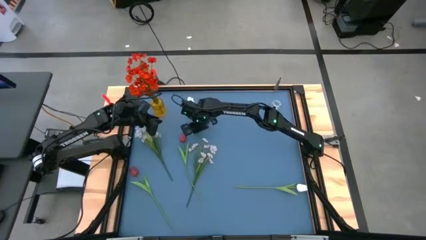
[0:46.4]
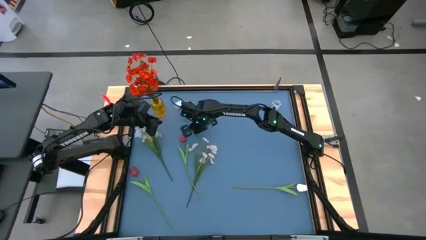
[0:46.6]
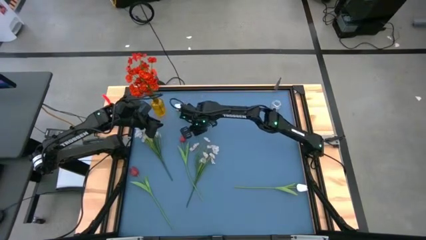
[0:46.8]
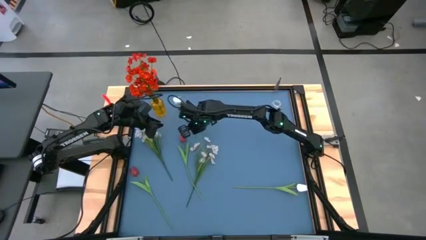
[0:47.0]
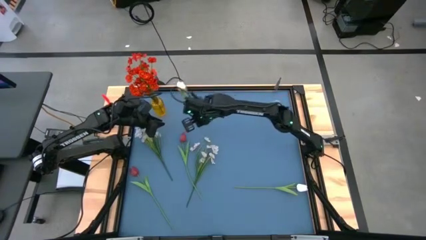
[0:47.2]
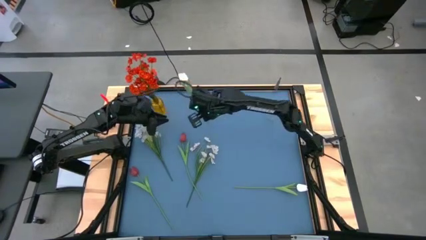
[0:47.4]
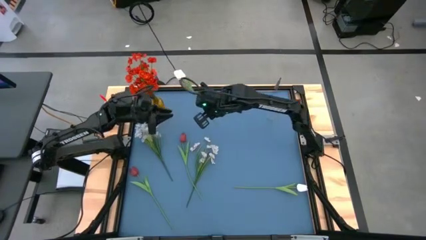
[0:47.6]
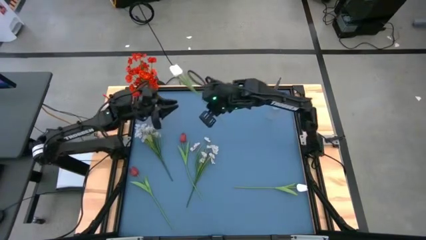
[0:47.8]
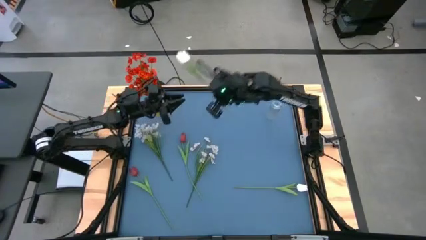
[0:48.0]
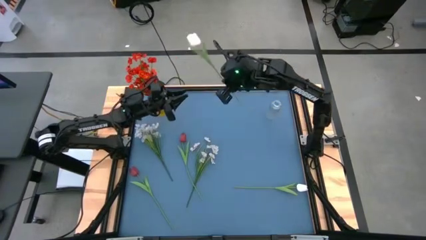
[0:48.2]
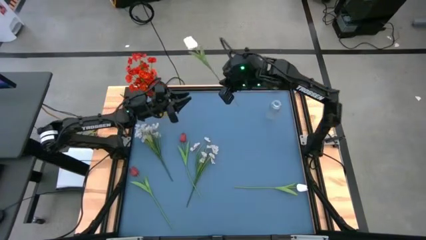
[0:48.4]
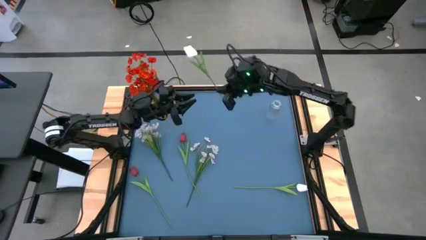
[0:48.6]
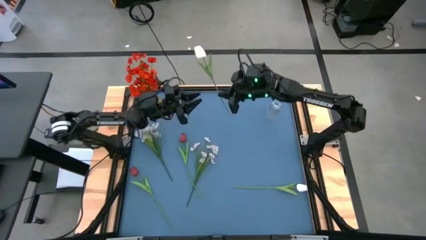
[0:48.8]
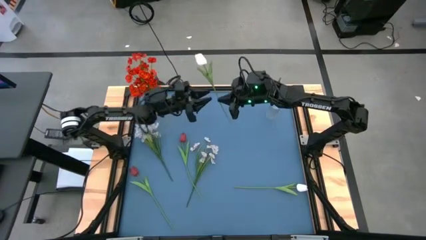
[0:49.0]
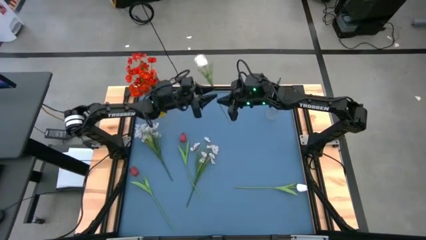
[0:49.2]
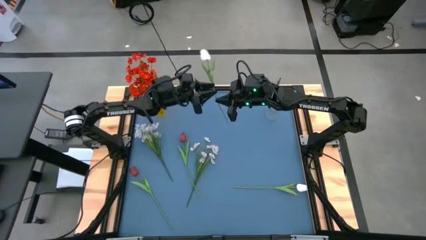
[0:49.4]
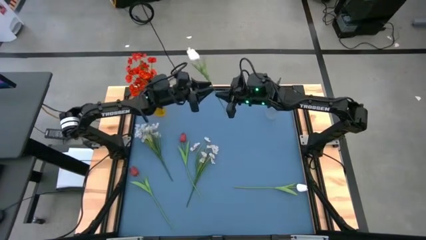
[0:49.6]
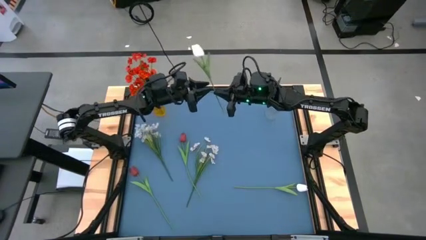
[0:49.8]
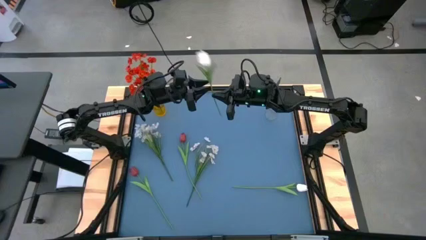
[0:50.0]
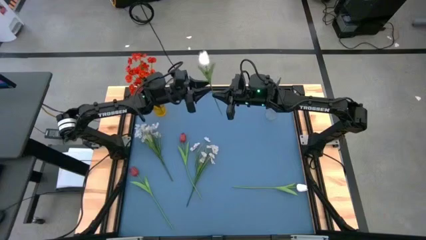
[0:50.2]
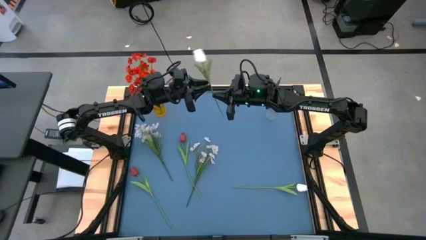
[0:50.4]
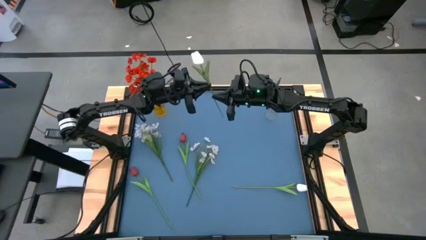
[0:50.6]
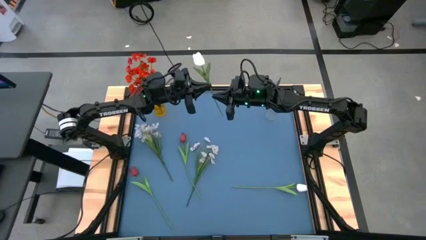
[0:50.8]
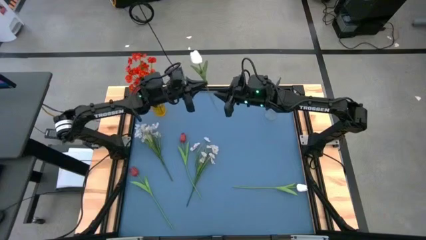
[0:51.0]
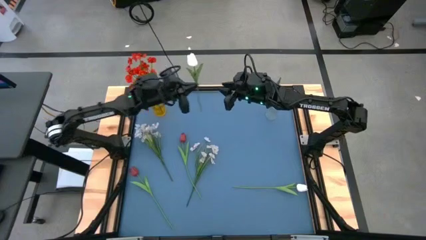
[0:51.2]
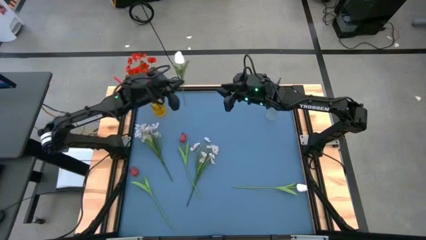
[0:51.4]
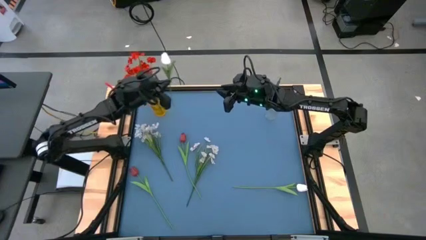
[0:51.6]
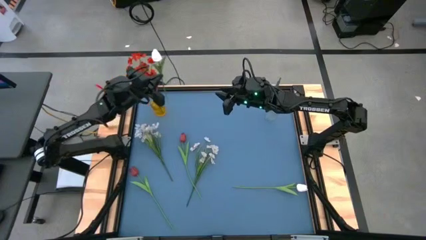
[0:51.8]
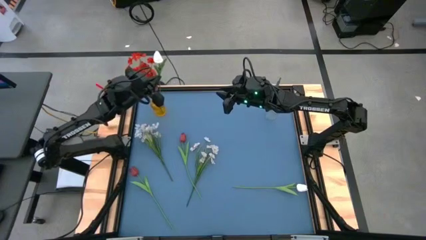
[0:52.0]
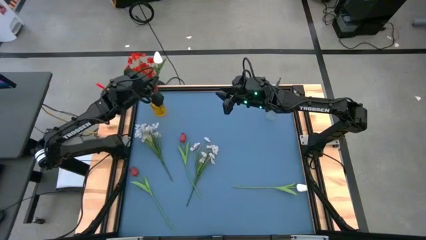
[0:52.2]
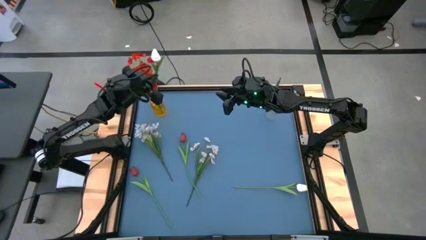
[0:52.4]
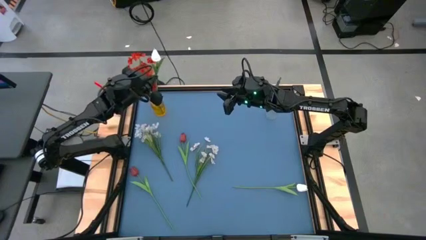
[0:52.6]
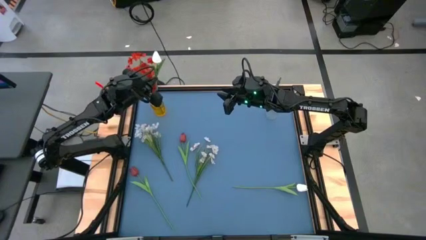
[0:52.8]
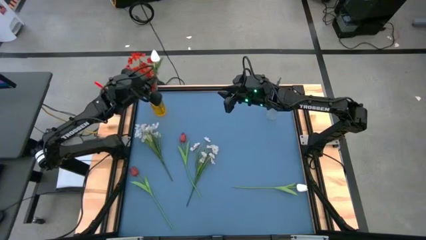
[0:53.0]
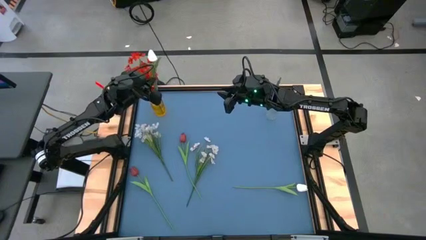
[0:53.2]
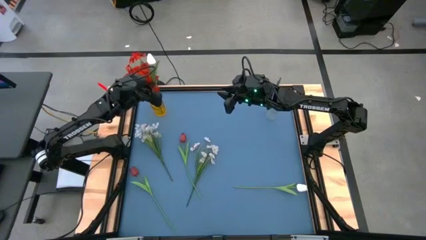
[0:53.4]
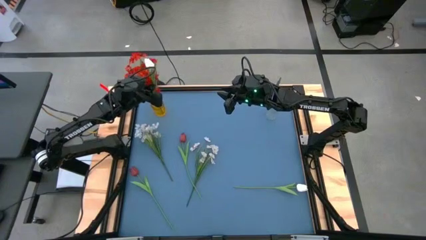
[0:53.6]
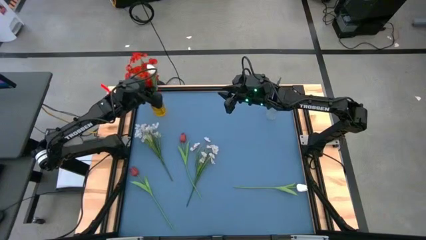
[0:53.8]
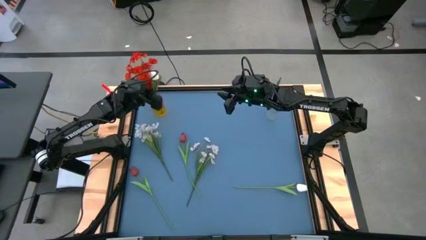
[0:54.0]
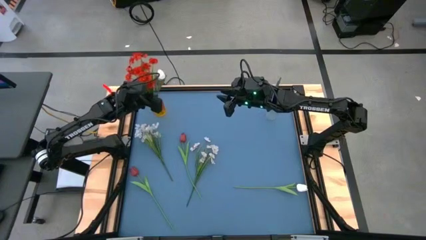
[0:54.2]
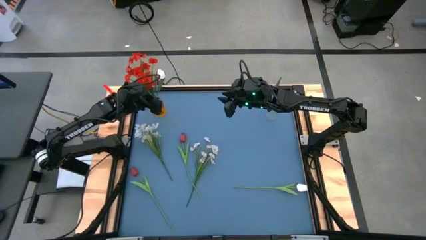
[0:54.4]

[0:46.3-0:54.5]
Task: Sort flowers into vase by color
Put the top white flowers into the yellow transparent flower vase

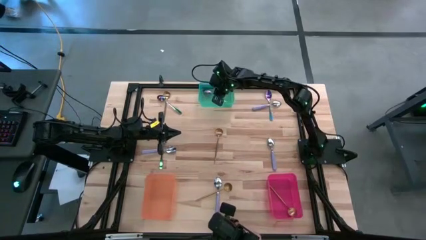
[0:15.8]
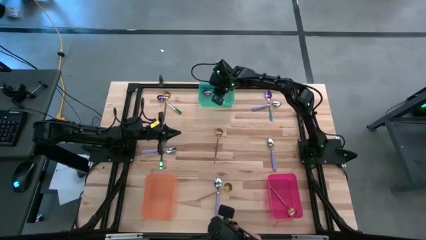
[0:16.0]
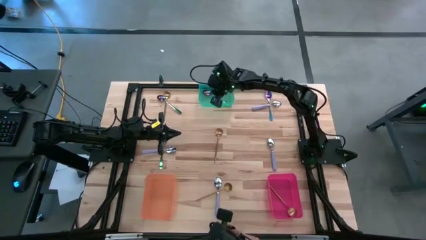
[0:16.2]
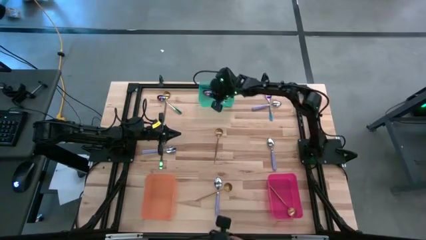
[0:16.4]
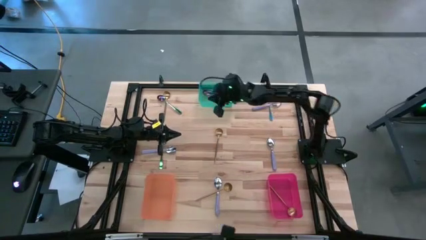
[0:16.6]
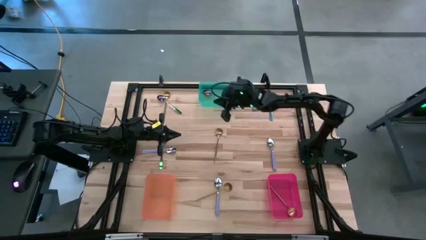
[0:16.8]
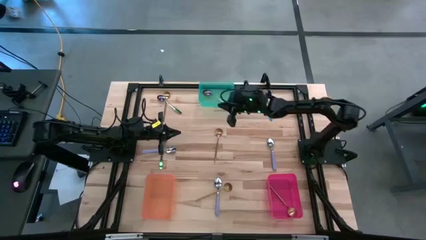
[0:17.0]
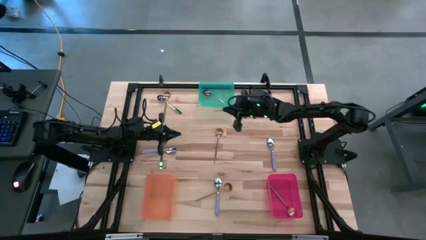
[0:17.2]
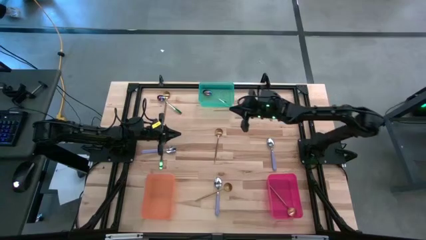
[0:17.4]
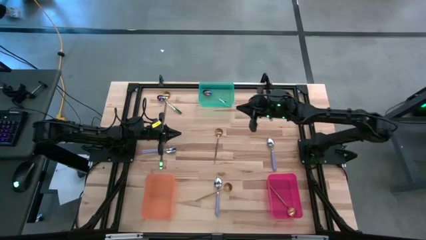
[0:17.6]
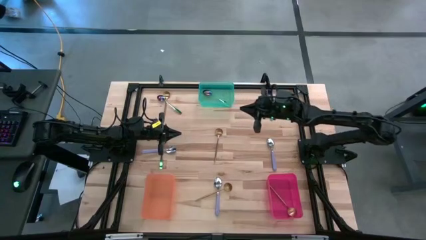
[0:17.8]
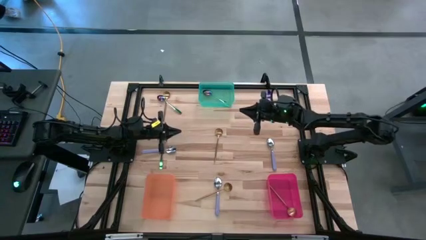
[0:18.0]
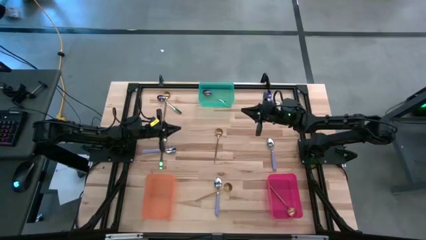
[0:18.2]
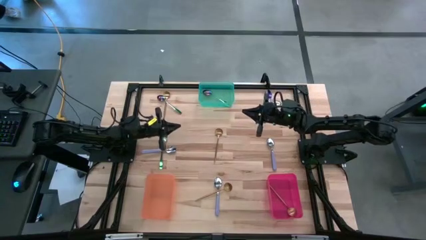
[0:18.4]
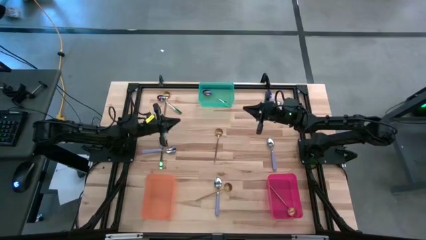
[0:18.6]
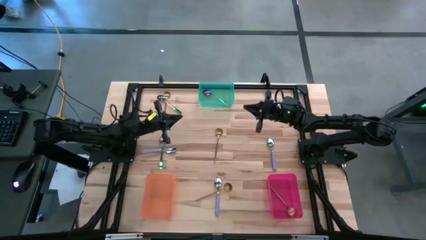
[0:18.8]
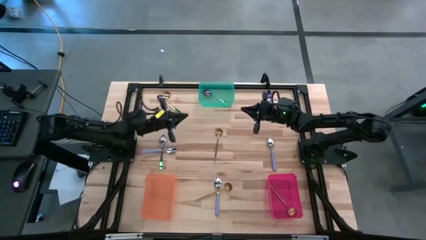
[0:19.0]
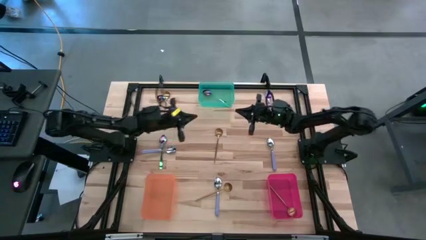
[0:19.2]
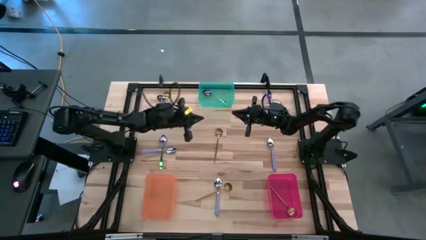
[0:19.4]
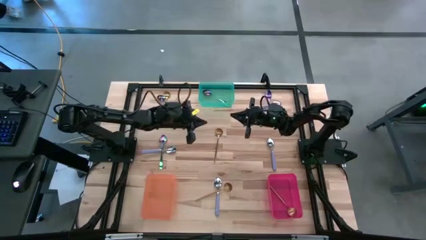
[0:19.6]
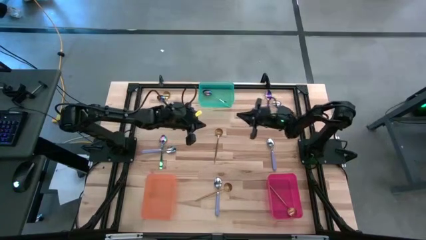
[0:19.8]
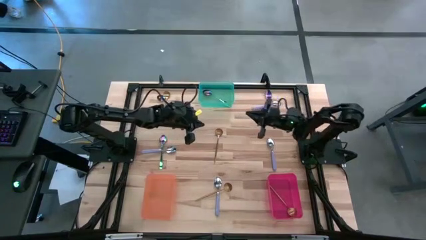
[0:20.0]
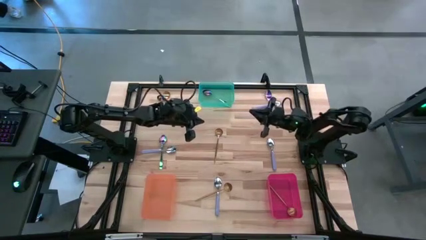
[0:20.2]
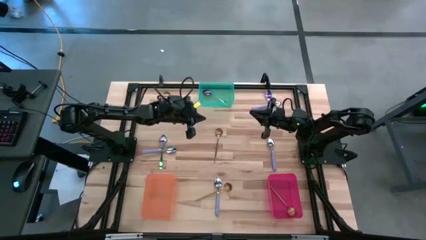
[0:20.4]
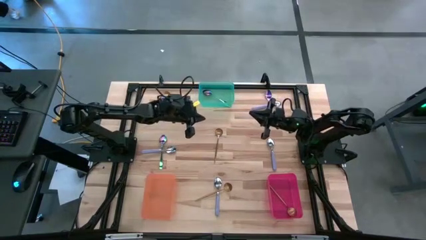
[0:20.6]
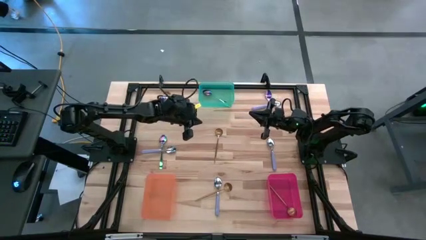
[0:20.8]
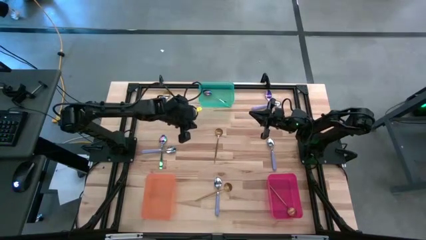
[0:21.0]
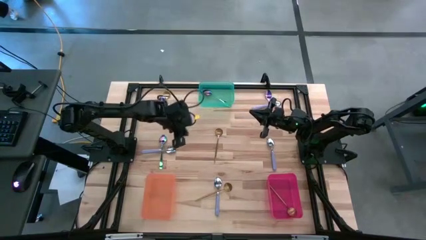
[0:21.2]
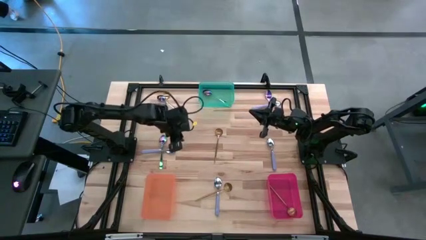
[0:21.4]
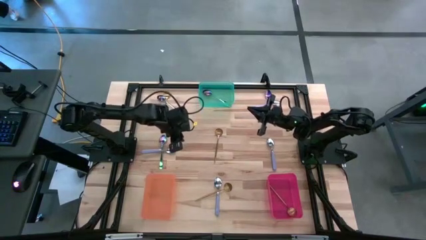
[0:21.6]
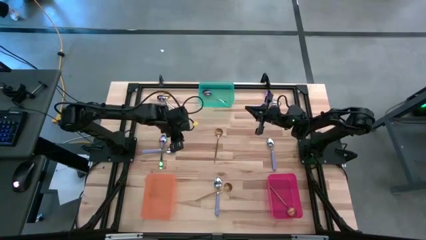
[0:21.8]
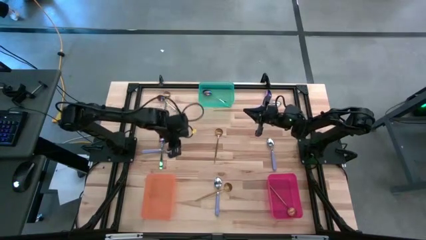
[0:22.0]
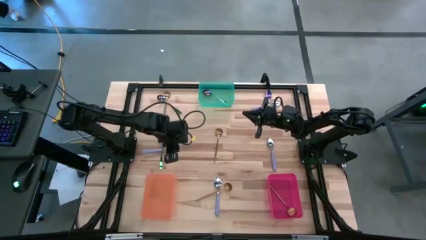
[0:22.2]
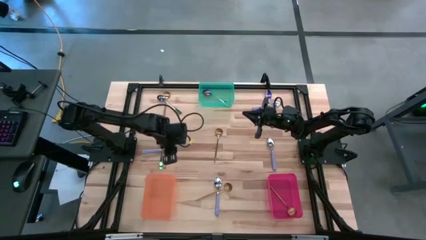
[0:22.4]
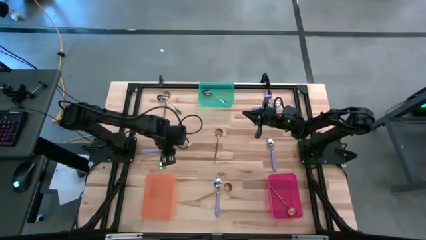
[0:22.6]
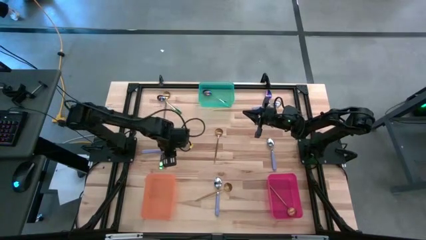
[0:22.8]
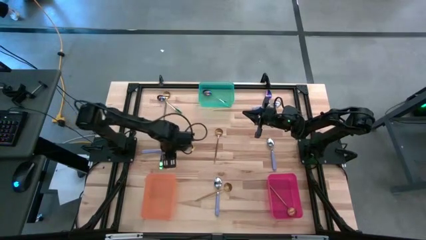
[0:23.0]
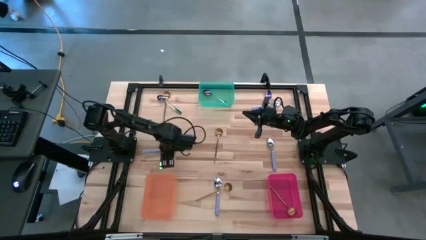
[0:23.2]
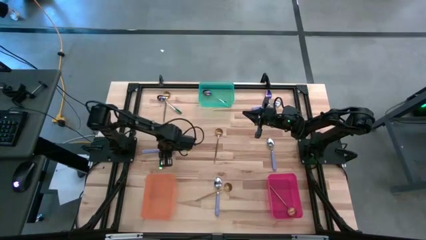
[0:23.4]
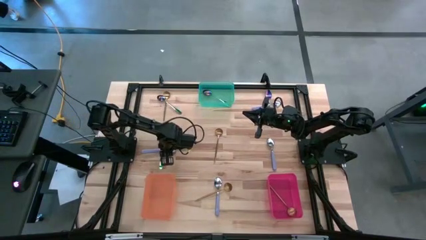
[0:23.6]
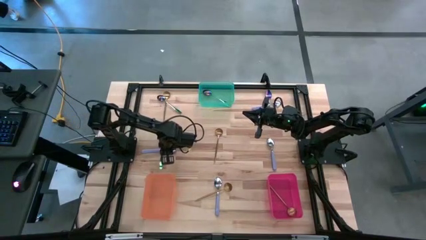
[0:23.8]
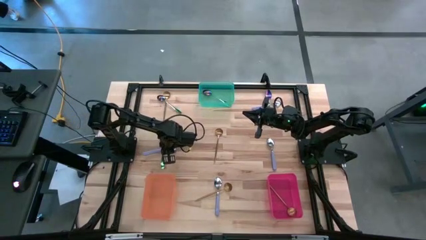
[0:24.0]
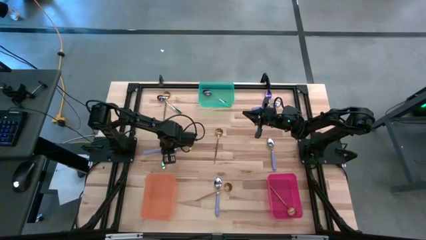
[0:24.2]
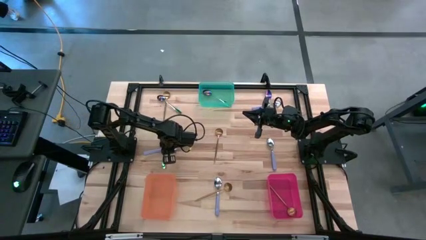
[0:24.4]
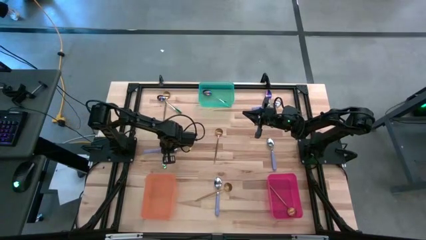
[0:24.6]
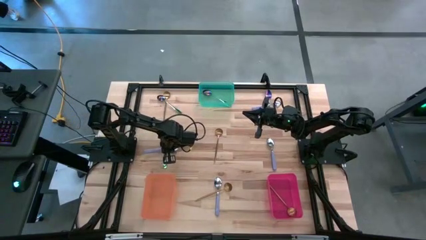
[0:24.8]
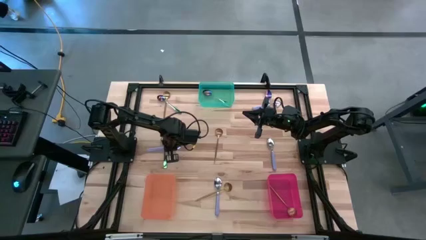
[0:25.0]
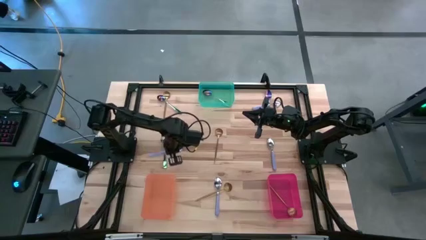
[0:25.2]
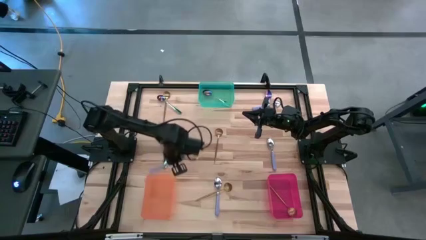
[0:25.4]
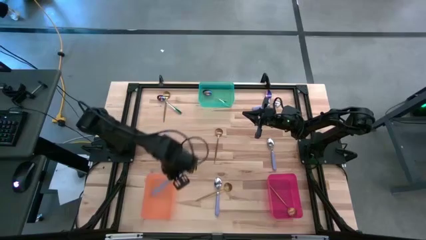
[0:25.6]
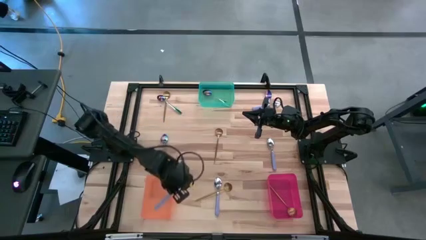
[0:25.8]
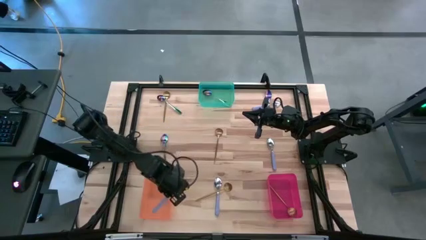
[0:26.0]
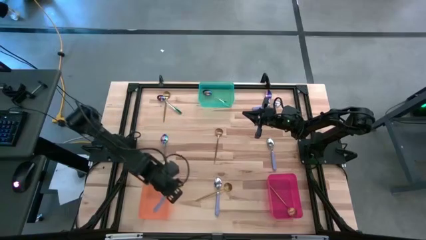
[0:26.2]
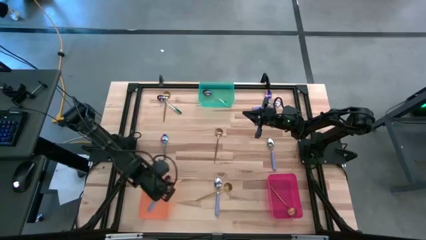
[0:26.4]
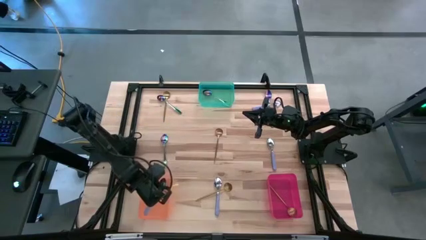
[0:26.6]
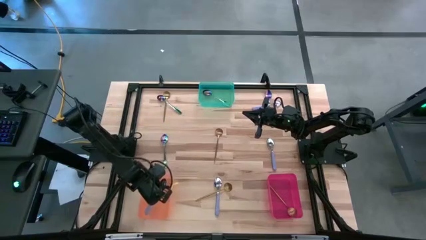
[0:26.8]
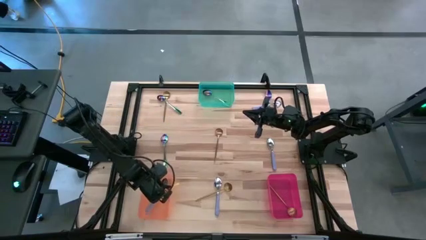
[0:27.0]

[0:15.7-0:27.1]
Task: Sort silverware by color (type)
Put the purple spoon into the orange bin
